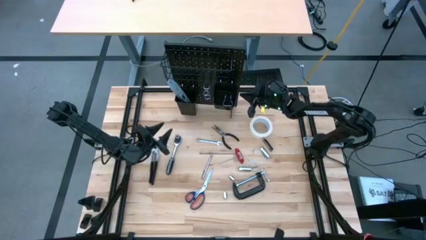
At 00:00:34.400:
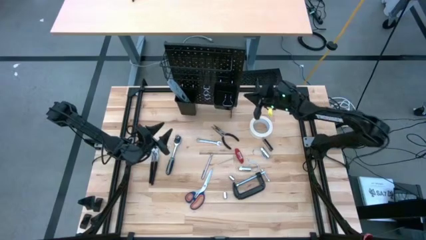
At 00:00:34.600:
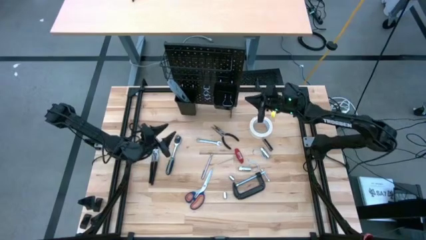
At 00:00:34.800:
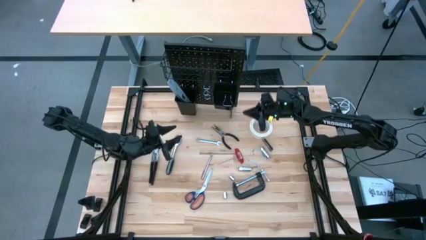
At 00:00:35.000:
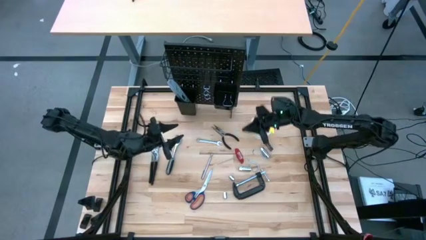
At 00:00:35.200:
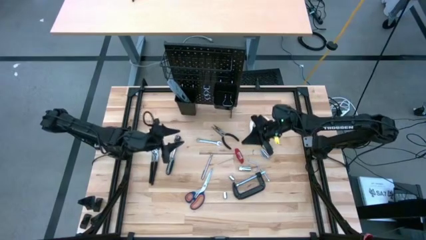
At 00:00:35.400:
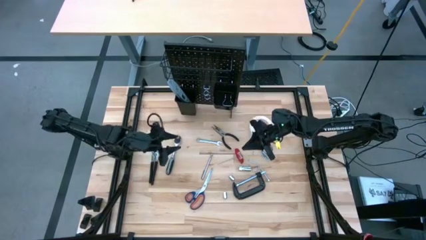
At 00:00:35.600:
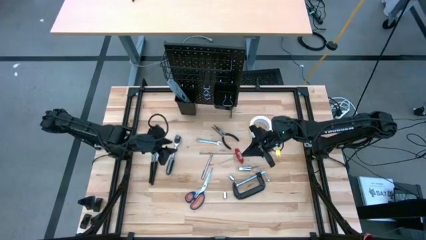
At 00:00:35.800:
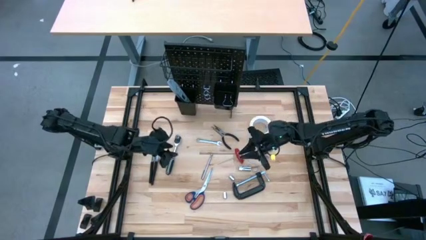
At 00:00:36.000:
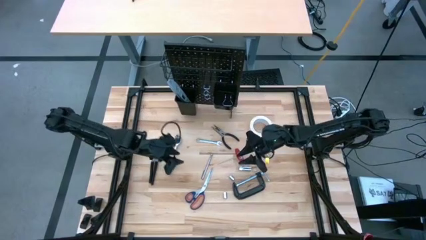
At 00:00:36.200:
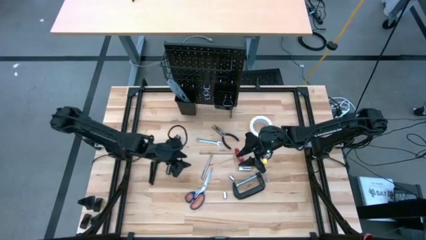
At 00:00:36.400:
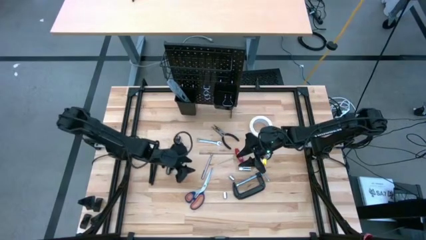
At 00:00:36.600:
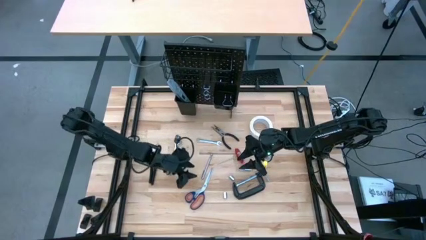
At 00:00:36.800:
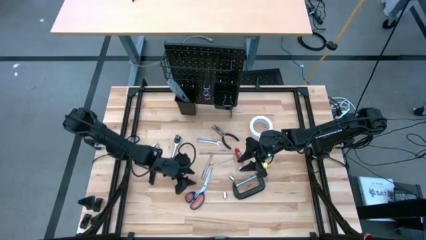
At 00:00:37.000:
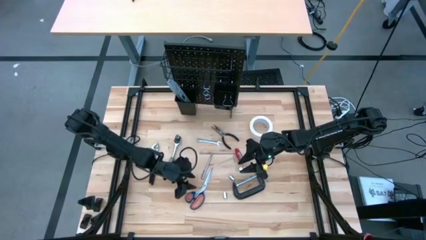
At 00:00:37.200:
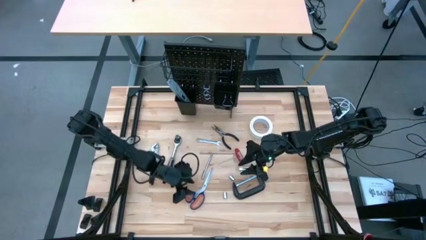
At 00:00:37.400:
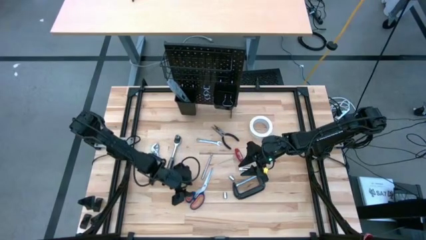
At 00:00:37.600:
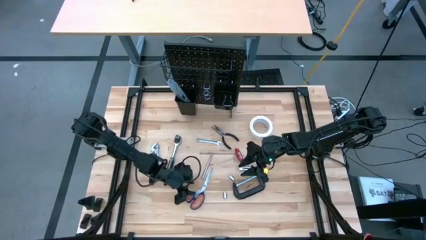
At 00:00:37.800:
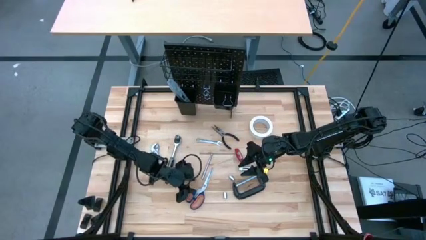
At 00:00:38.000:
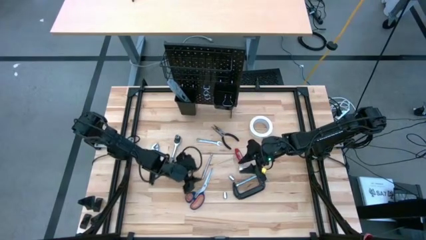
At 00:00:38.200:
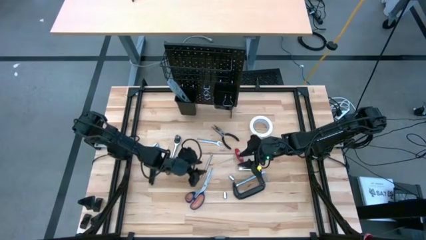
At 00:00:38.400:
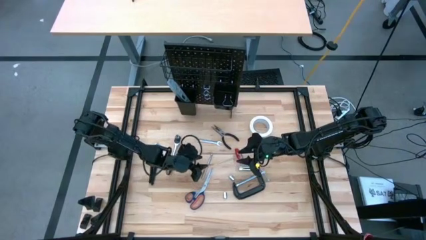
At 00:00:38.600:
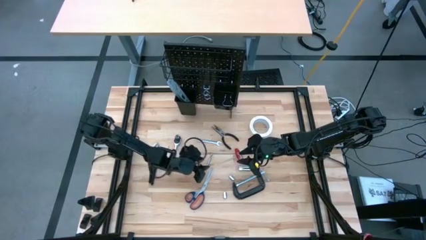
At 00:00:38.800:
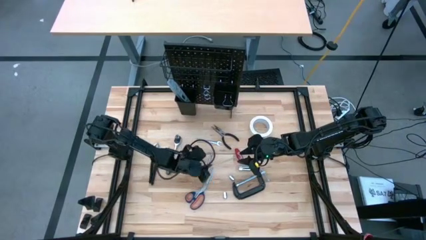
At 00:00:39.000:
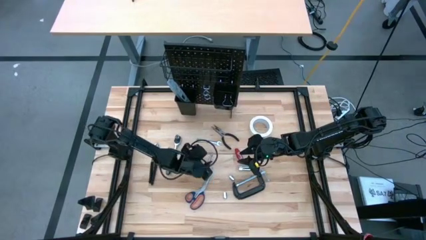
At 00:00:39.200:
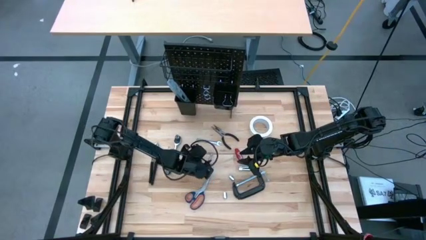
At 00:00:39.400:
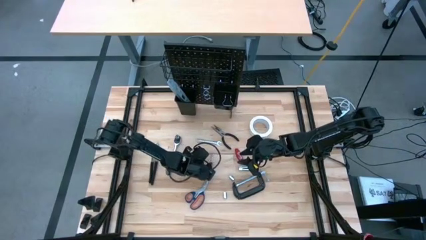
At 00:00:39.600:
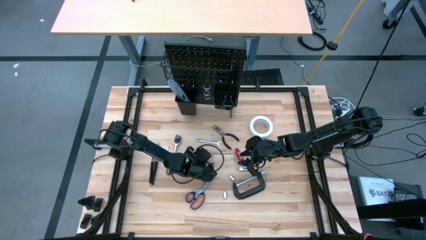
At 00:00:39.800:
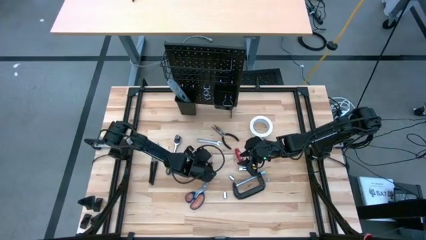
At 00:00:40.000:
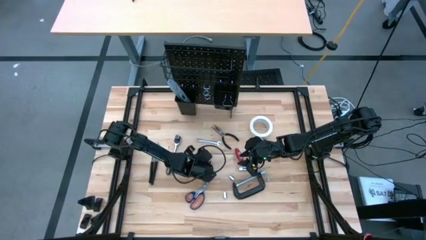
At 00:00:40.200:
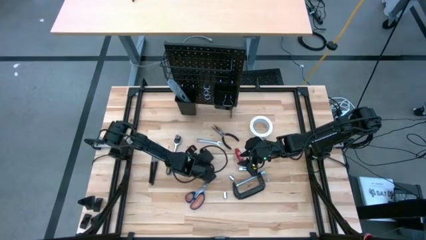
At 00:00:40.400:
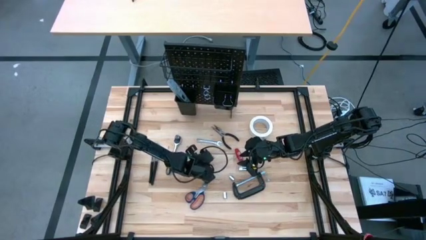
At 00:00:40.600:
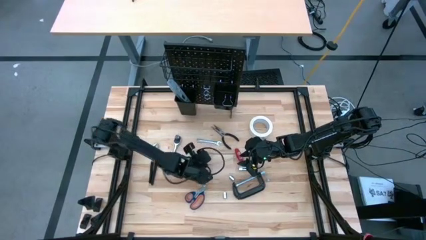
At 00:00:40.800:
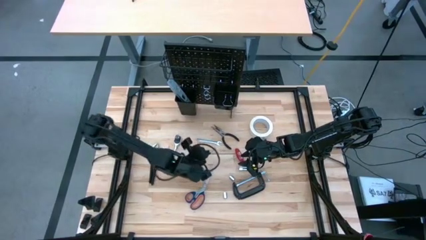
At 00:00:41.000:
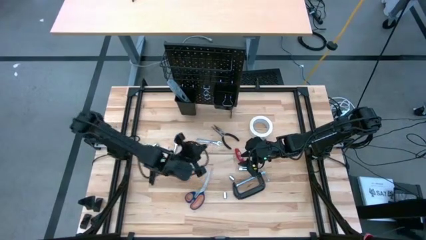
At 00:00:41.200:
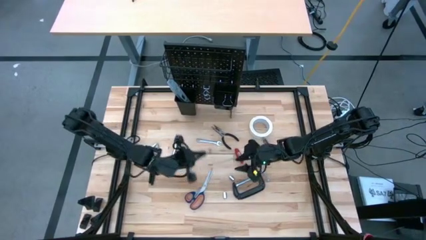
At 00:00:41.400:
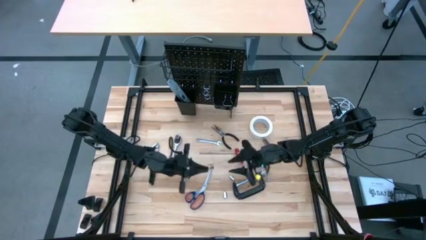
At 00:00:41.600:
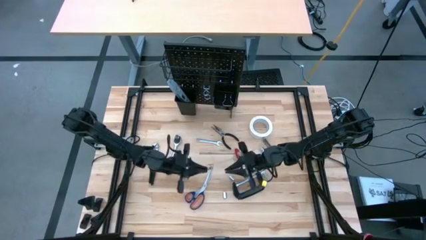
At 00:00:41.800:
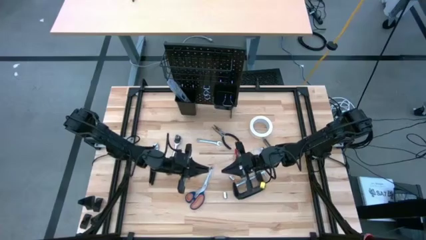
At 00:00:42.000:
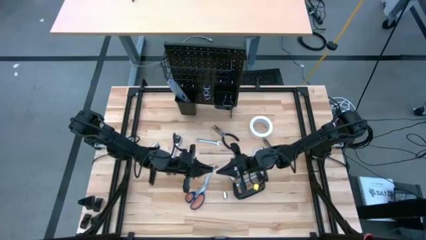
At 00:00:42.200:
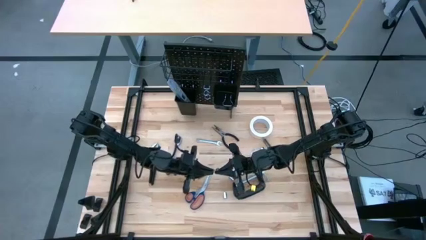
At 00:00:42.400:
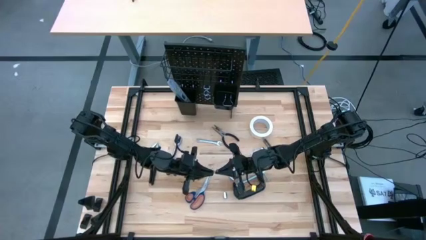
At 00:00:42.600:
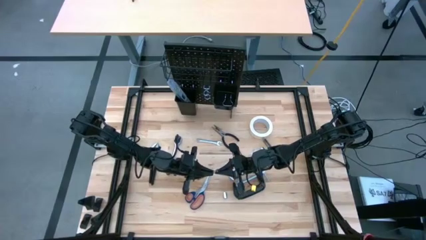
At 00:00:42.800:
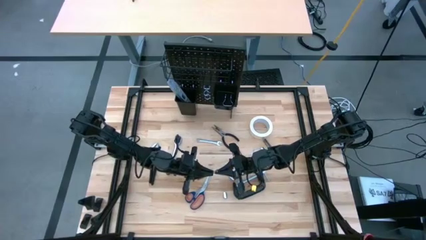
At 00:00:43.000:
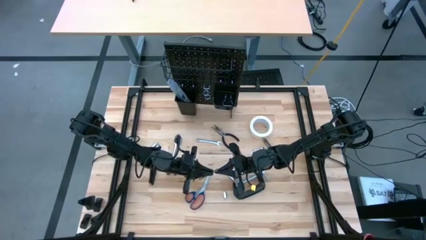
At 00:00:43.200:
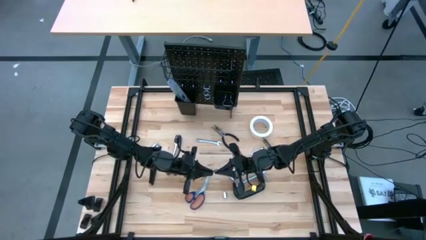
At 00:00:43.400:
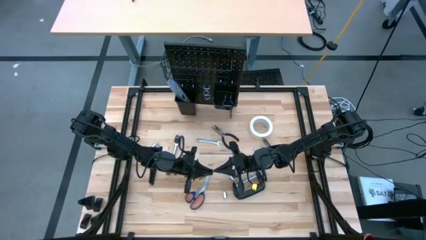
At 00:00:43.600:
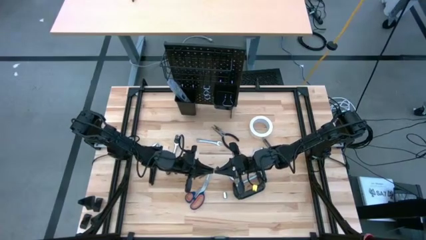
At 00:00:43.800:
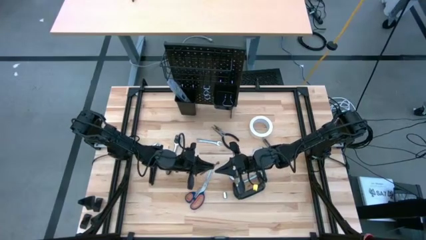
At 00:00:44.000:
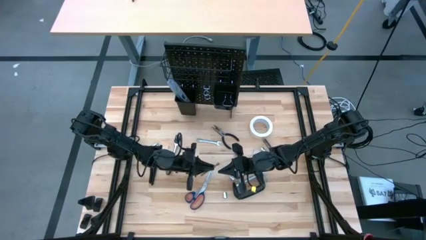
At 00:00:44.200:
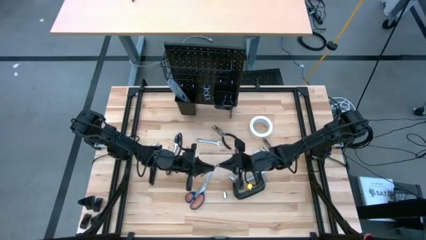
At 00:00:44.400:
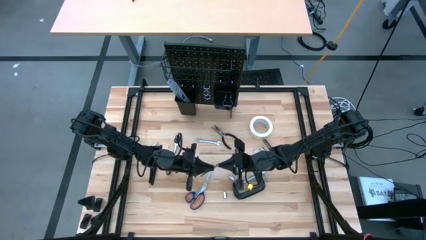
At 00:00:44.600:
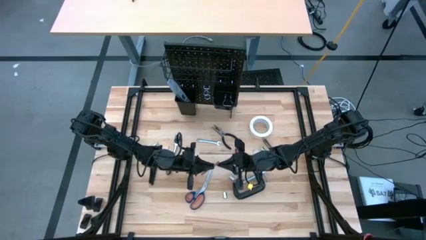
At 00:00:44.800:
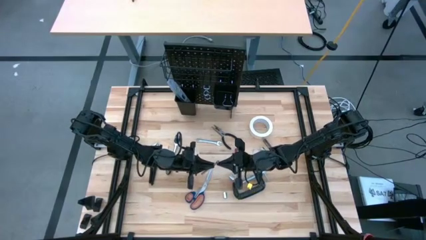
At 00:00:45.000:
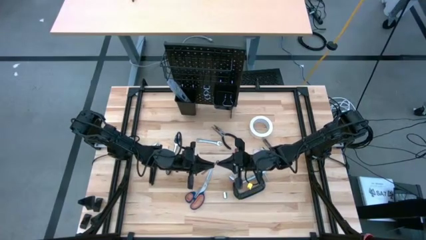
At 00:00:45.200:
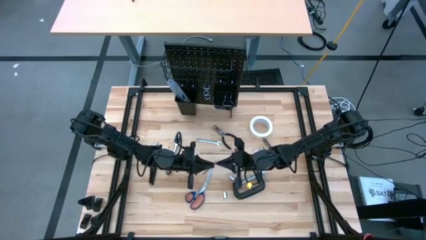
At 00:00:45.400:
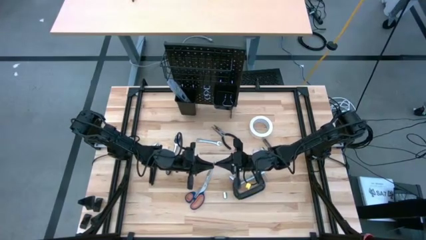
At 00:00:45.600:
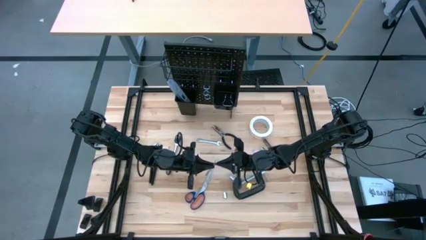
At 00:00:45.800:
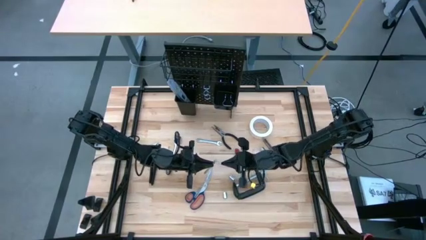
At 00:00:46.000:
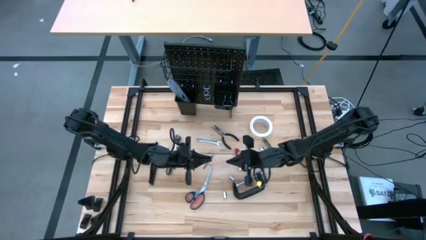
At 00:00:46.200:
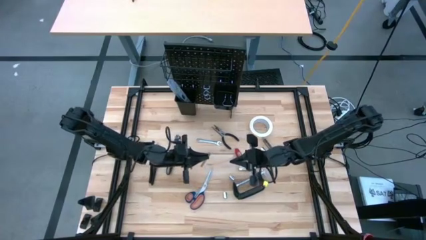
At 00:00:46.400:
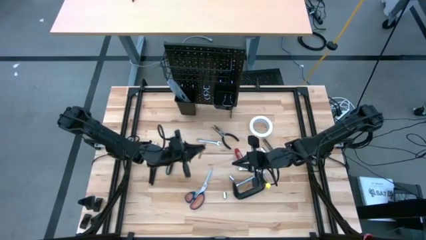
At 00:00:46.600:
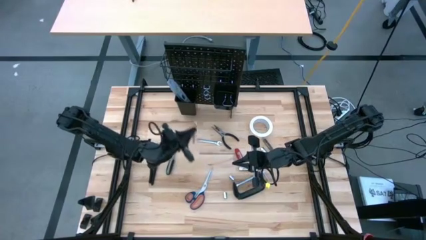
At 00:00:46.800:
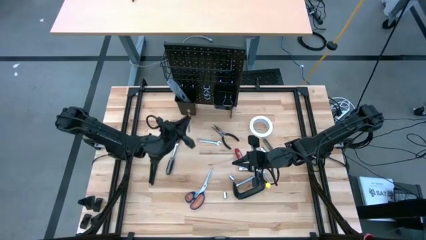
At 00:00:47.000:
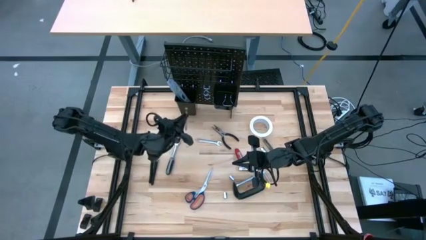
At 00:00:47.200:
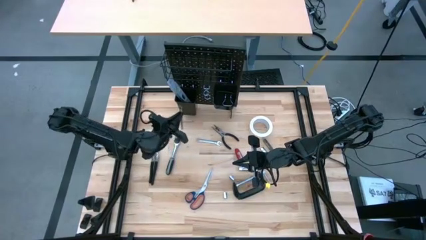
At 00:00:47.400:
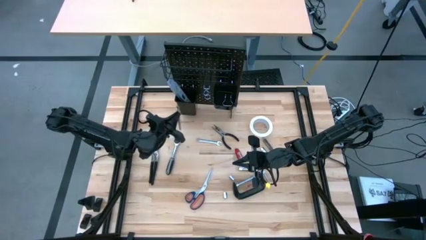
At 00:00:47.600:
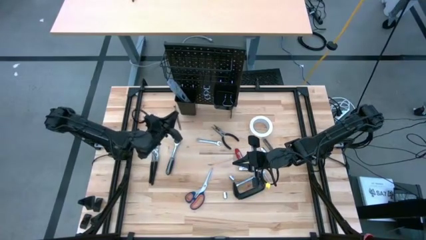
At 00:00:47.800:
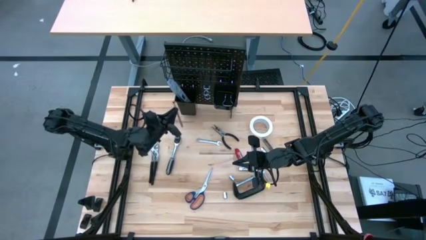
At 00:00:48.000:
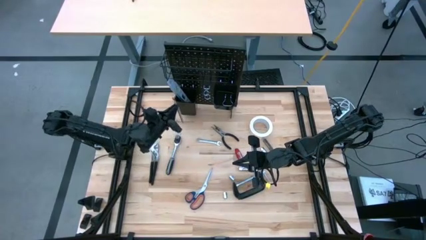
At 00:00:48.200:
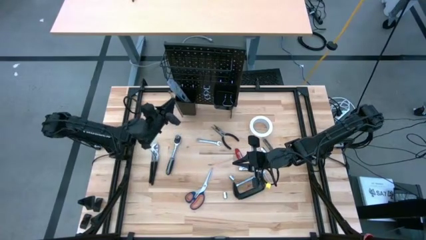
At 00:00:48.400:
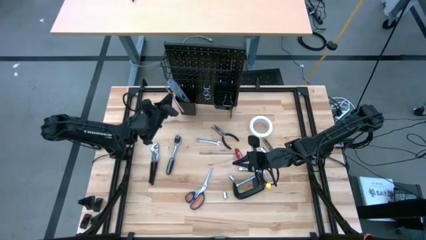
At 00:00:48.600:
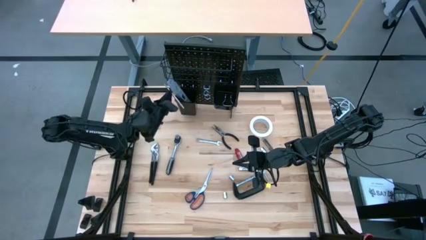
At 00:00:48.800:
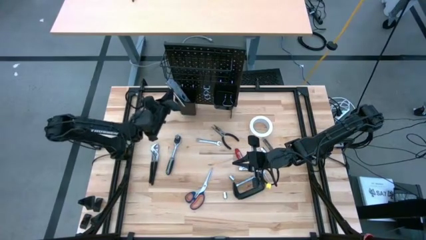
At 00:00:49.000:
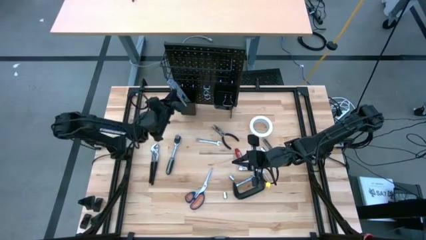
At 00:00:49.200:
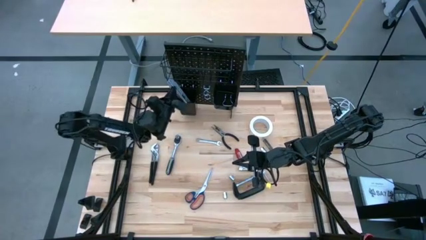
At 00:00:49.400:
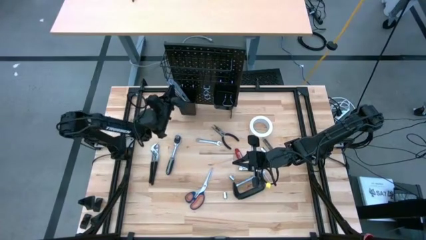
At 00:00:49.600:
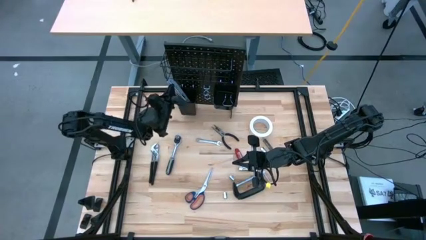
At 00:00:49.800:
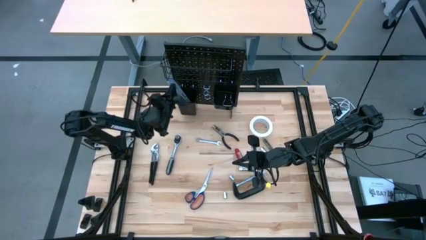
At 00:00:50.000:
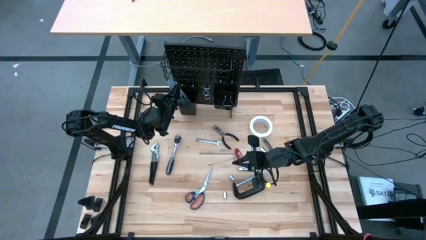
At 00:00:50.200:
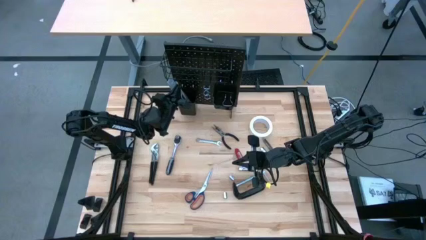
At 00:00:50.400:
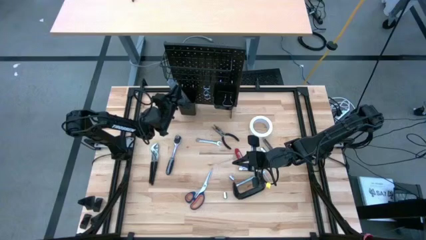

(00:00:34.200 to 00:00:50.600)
Task: Hang tools onto peg board
Put the magnetic pickup tool into the left black bin on the peg board
